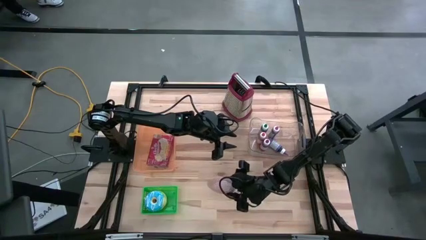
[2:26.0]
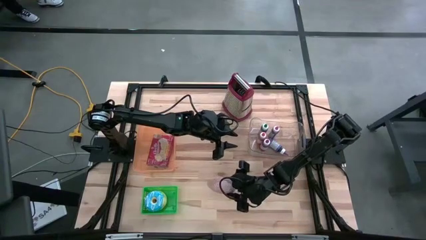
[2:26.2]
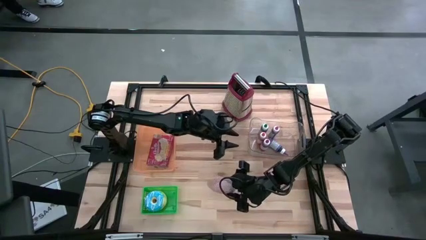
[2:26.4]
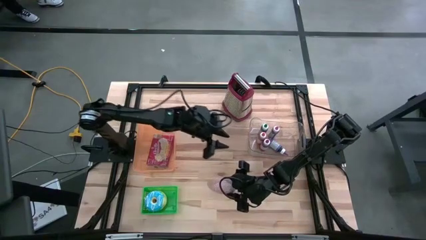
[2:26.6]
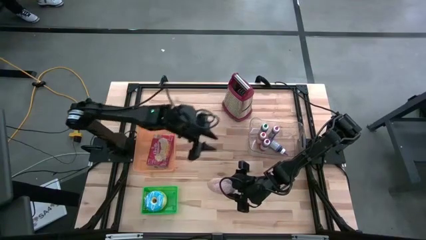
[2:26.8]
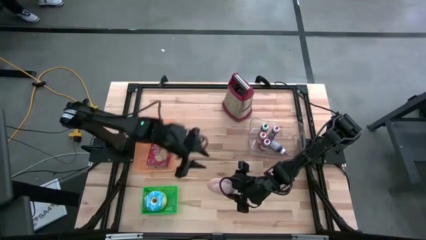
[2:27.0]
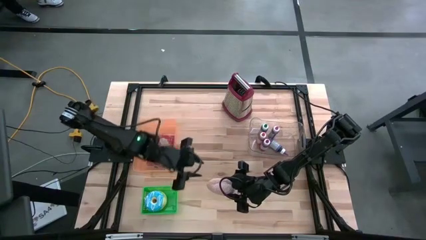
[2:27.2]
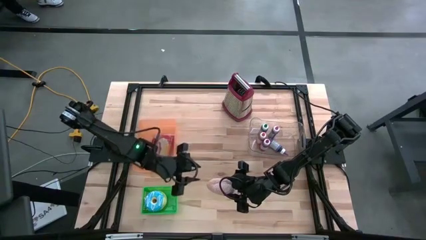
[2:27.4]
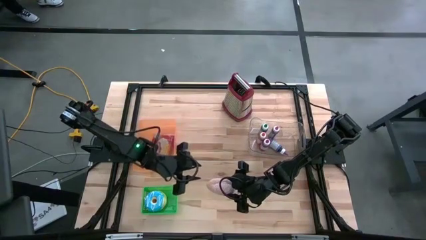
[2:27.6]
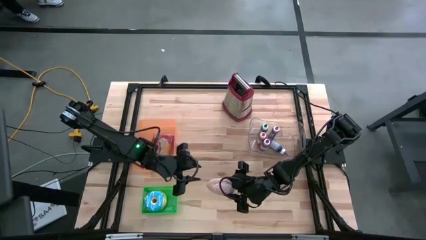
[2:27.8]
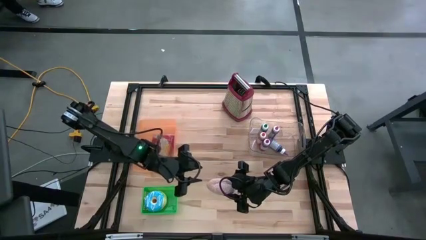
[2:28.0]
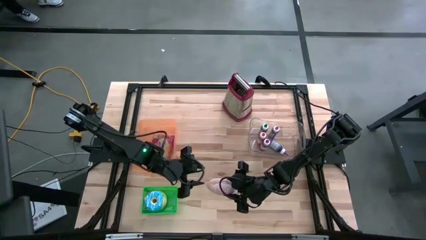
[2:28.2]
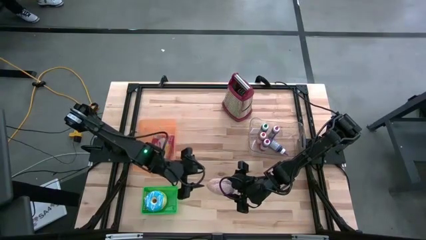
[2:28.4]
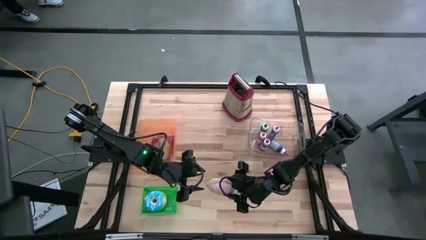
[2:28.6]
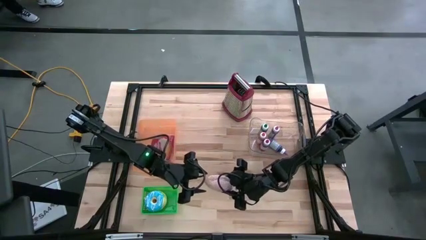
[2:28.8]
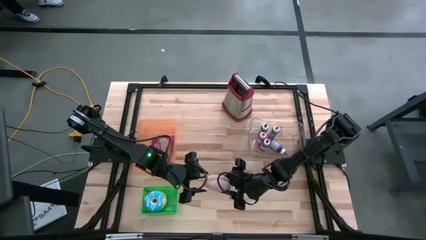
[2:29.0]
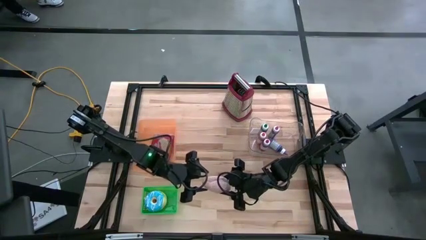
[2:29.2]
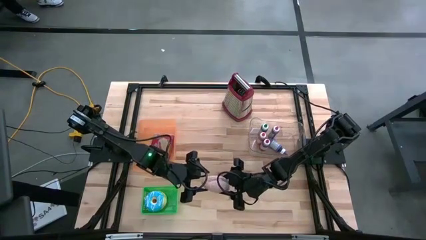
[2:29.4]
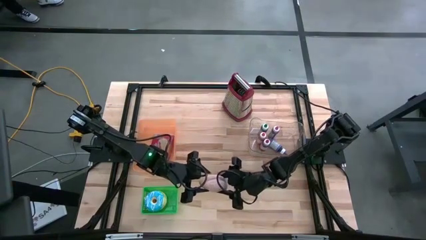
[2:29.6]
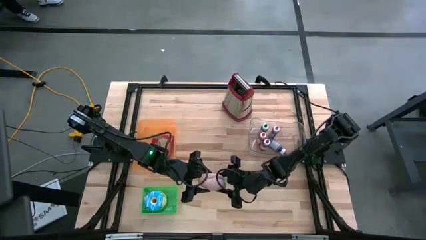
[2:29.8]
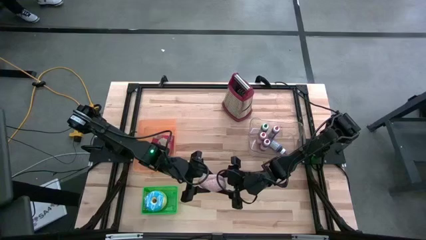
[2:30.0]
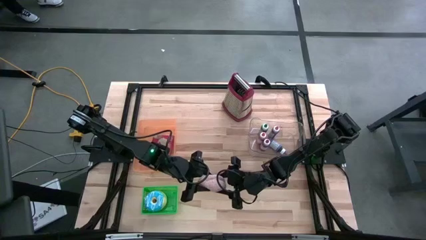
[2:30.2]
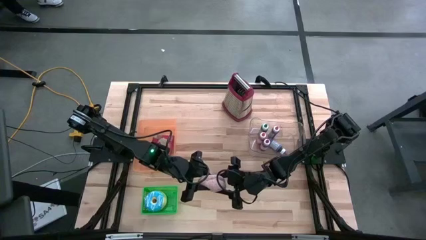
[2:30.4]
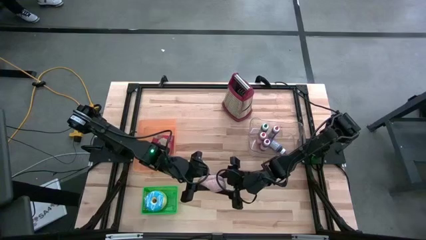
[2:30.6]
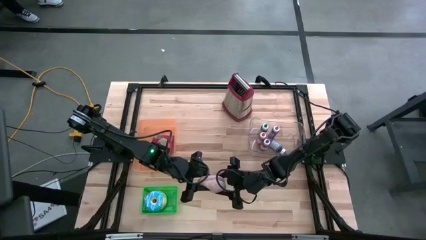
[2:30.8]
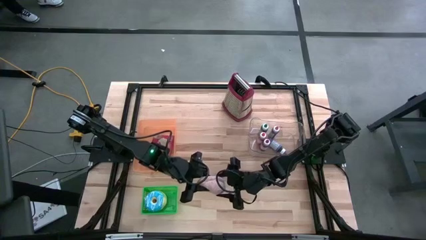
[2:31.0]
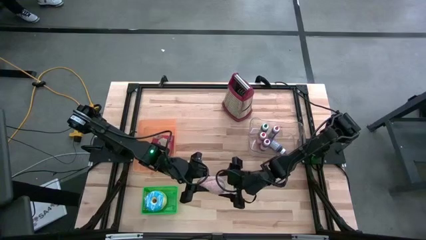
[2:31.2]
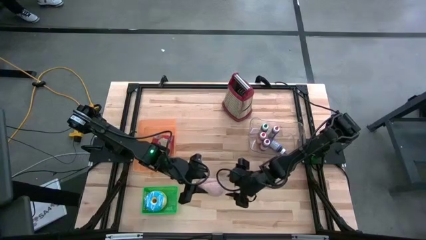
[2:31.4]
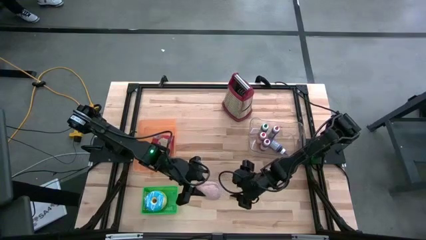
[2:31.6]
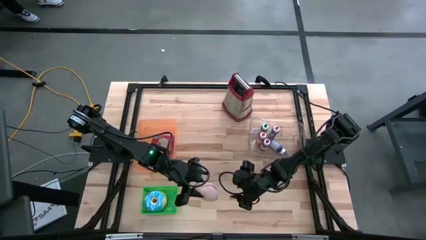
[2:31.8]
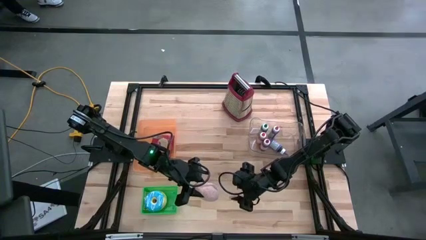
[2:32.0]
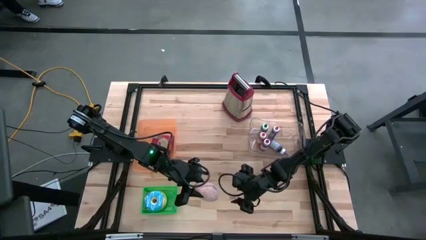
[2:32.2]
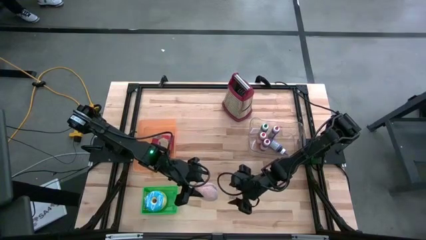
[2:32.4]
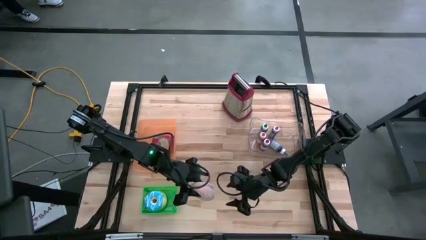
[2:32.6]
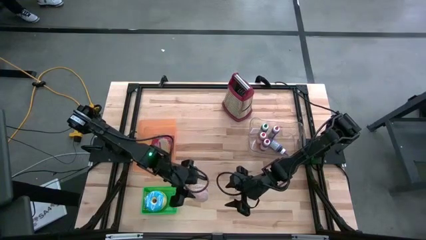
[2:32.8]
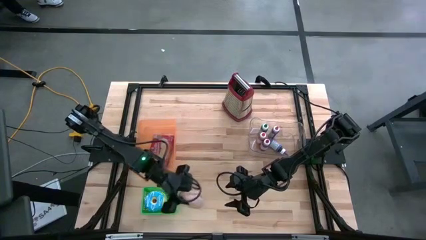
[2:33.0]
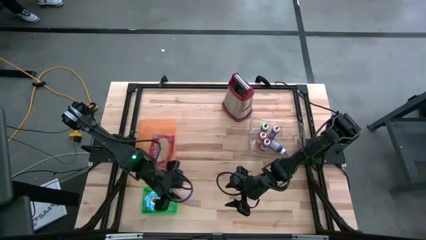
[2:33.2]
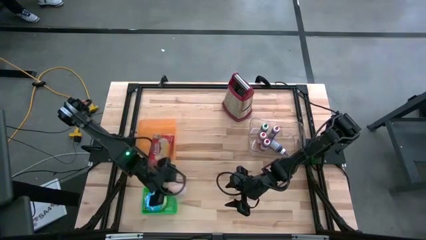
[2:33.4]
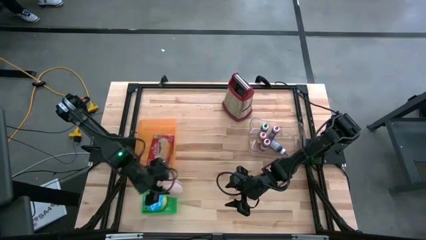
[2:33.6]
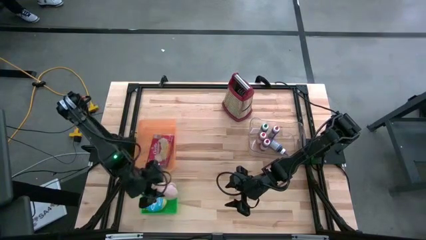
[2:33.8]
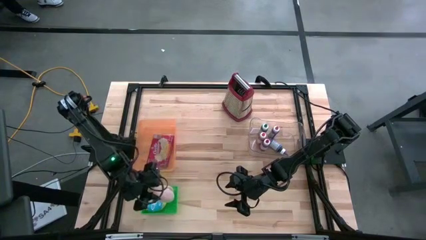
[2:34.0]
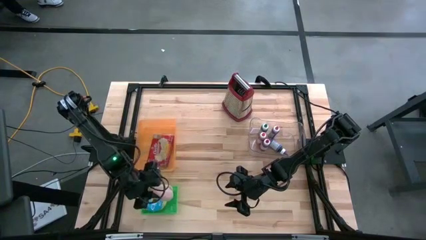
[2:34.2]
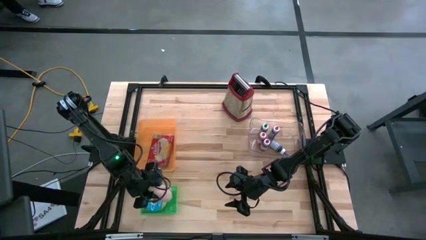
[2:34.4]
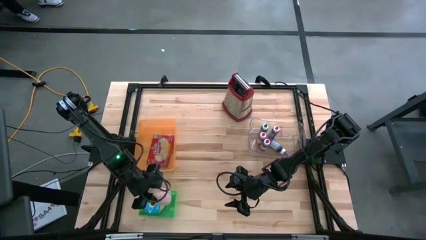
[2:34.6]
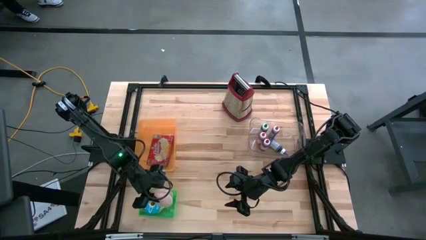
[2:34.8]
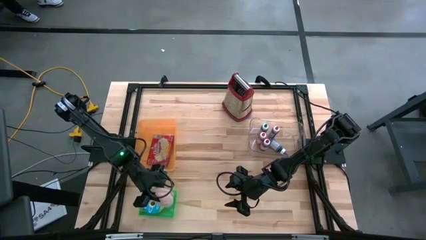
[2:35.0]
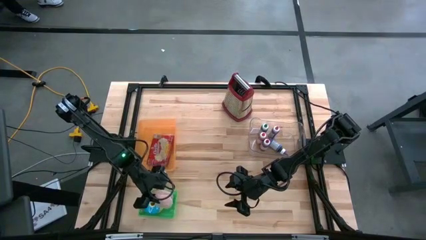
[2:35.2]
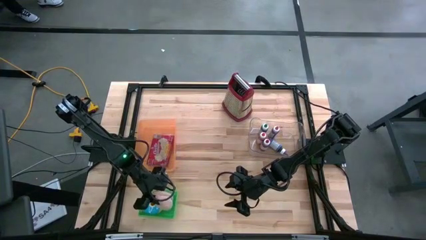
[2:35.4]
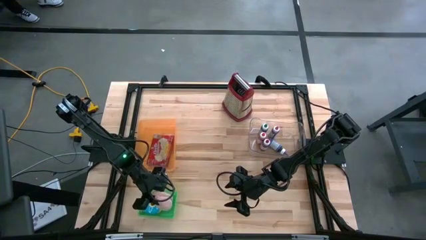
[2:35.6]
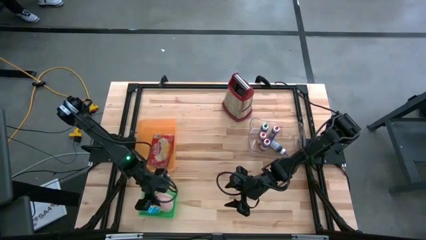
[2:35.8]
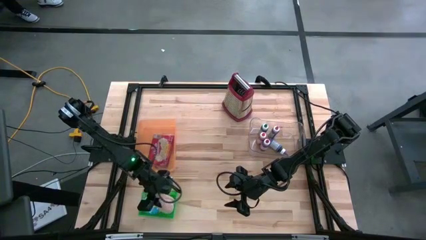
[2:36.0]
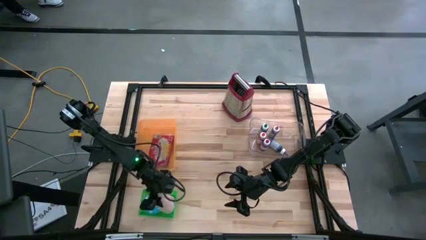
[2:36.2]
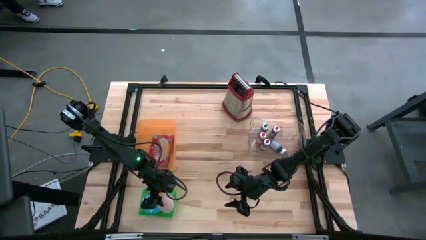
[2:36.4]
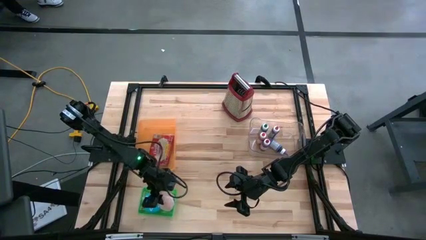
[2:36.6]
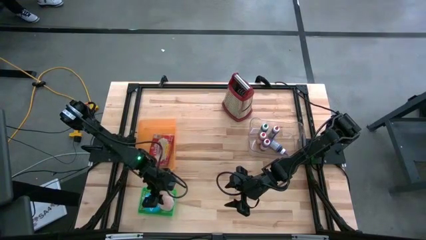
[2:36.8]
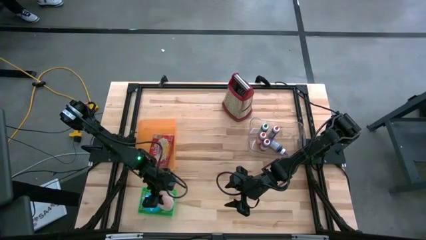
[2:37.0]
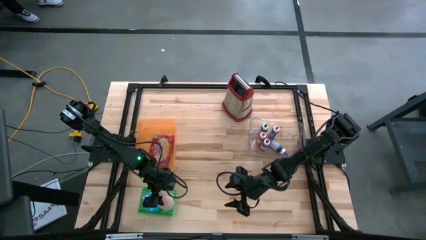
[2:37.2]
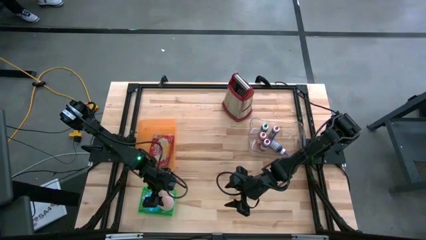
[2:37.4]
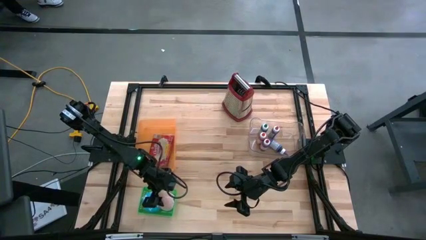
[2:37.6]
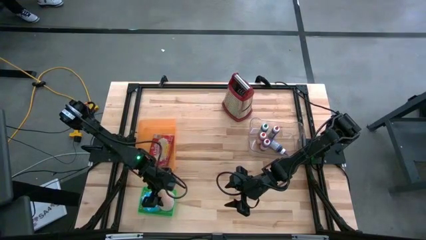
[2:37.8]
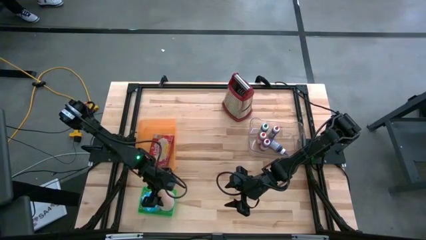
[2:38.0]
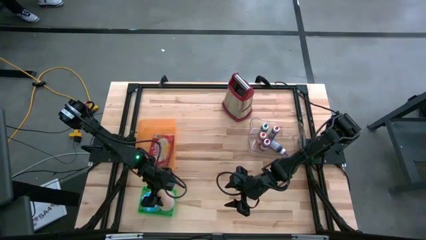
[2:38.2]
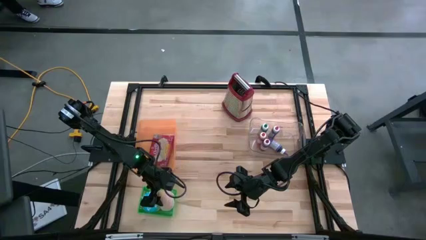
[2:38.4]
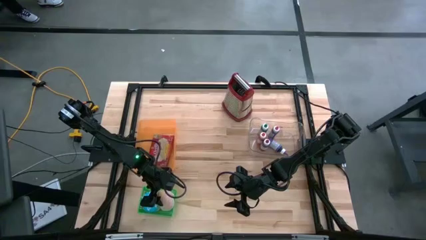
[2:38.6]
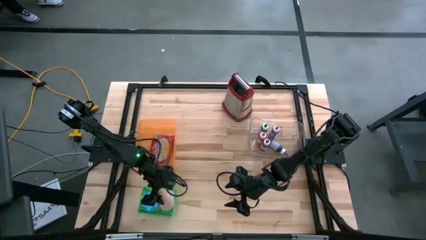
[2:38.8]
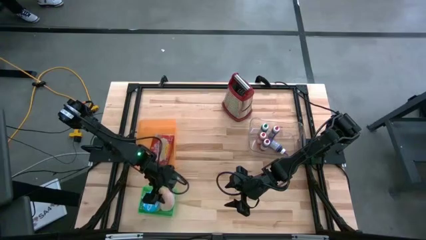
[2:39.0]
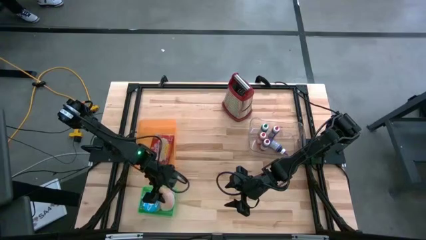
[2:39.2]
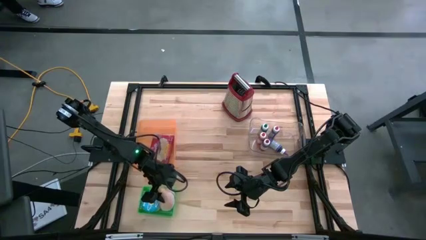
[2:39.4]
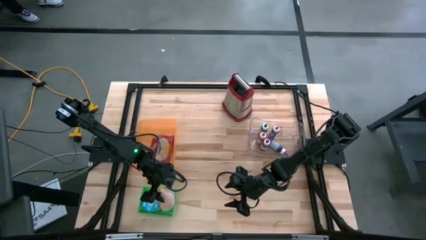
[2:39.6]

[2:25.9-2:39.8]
Put the brown donut into the green basket
